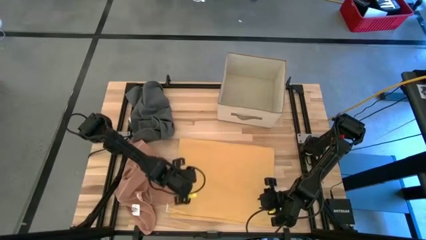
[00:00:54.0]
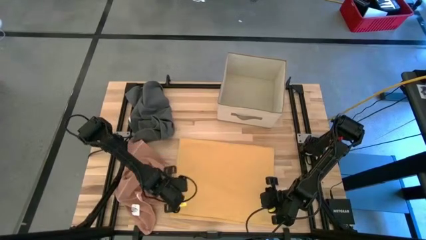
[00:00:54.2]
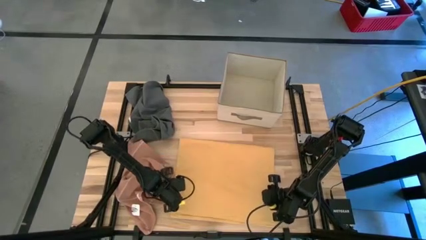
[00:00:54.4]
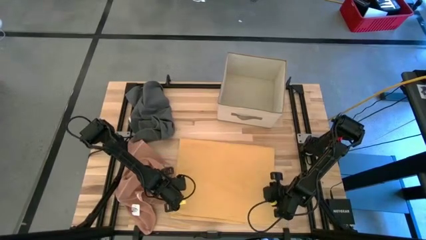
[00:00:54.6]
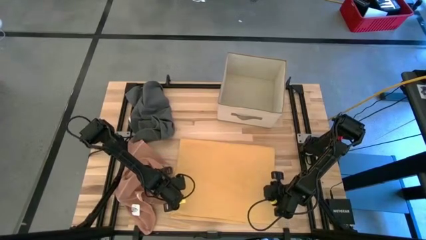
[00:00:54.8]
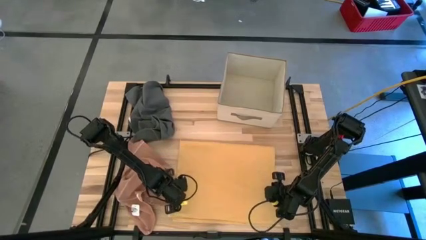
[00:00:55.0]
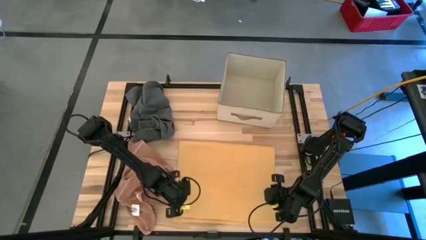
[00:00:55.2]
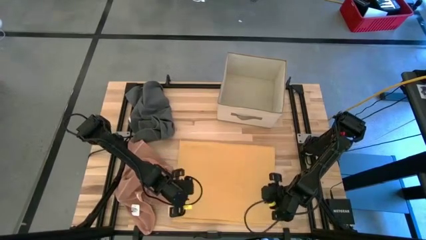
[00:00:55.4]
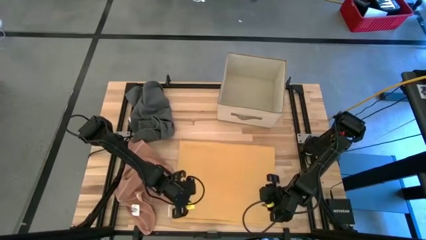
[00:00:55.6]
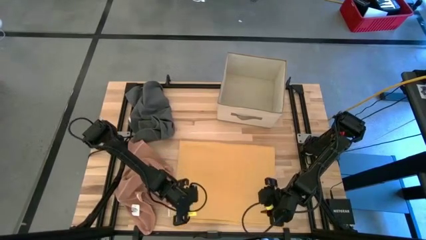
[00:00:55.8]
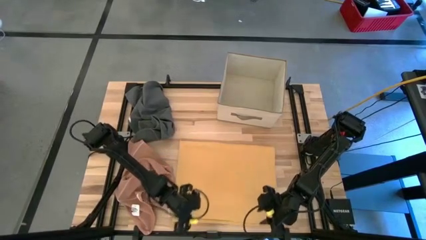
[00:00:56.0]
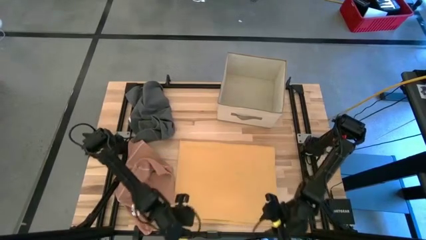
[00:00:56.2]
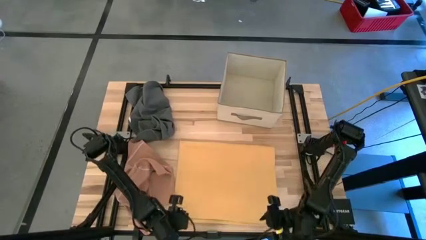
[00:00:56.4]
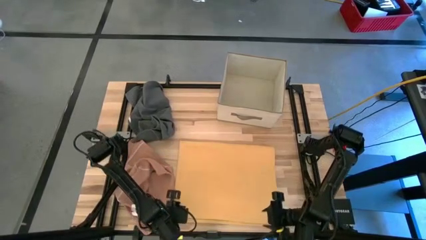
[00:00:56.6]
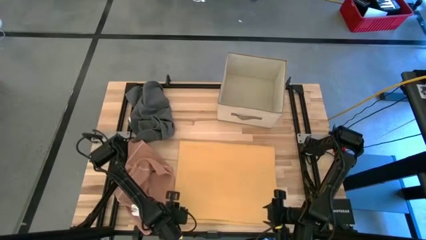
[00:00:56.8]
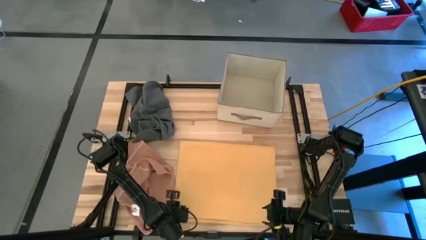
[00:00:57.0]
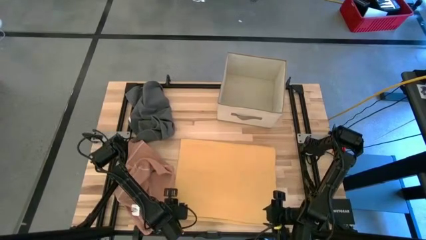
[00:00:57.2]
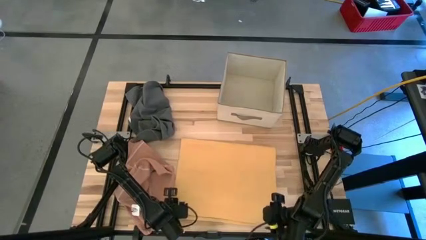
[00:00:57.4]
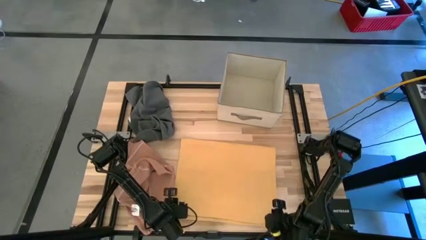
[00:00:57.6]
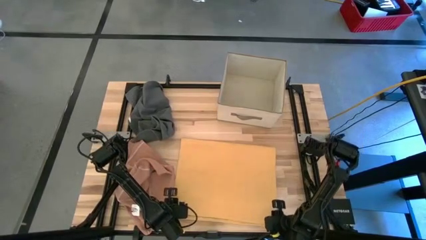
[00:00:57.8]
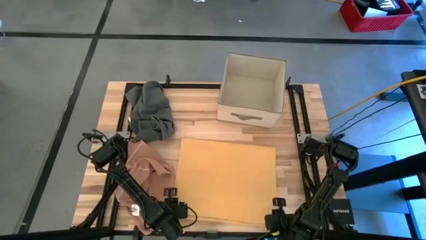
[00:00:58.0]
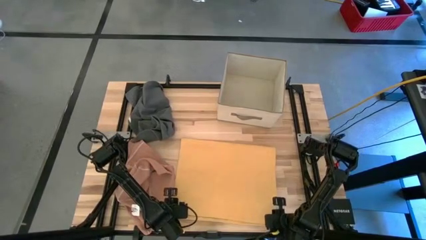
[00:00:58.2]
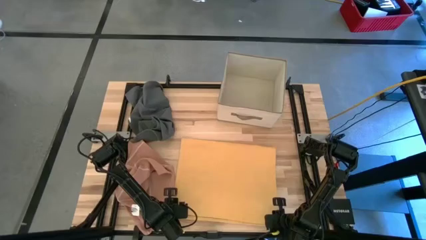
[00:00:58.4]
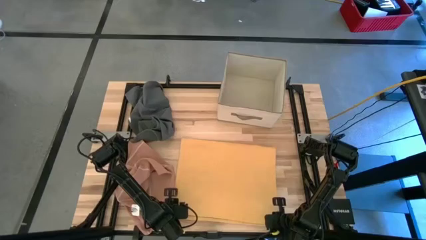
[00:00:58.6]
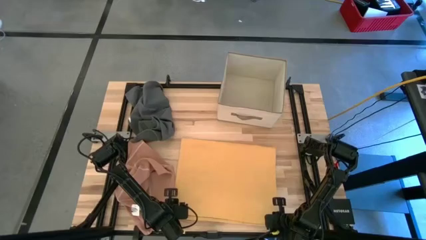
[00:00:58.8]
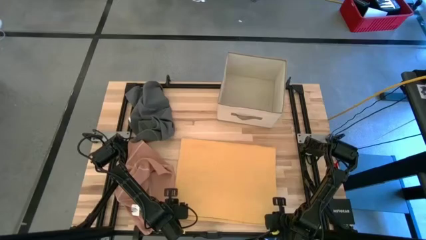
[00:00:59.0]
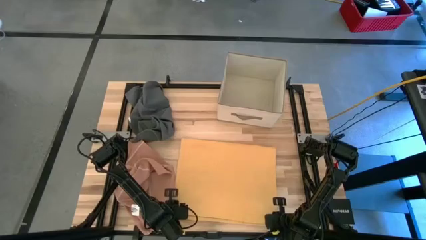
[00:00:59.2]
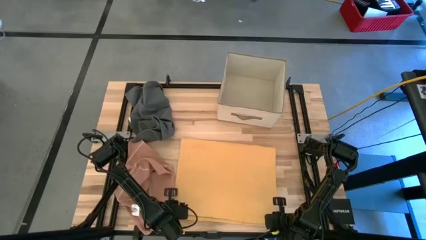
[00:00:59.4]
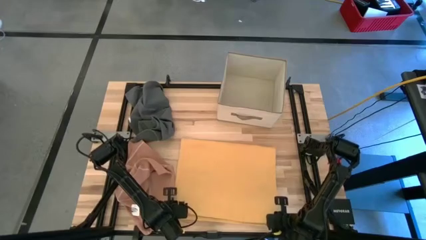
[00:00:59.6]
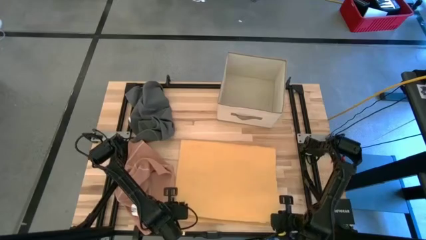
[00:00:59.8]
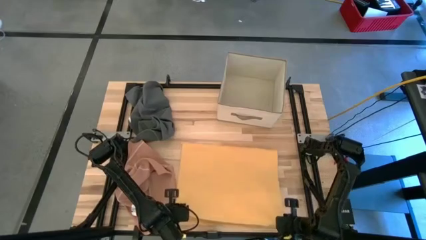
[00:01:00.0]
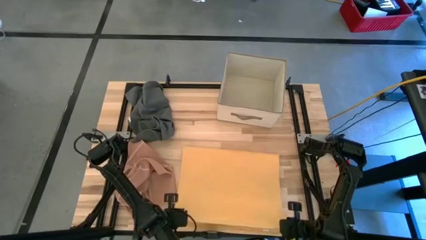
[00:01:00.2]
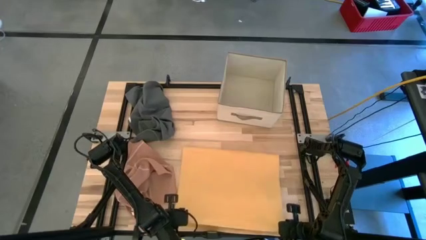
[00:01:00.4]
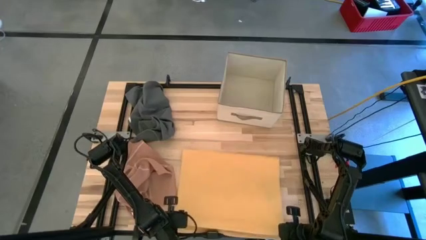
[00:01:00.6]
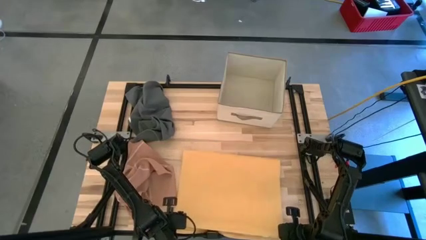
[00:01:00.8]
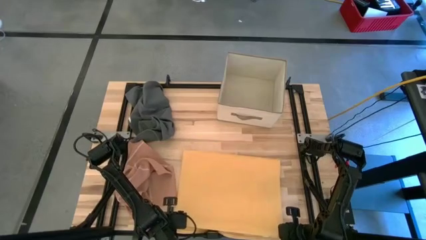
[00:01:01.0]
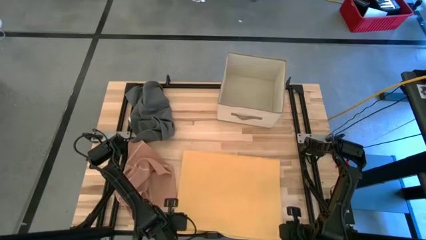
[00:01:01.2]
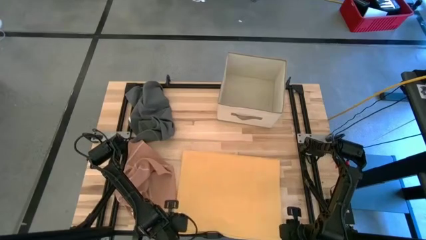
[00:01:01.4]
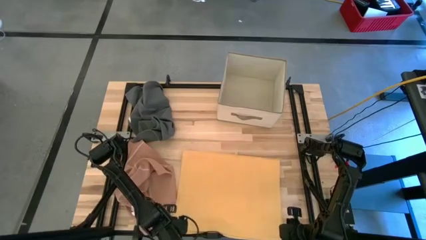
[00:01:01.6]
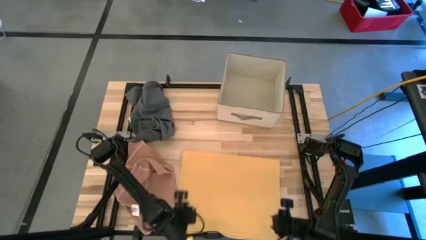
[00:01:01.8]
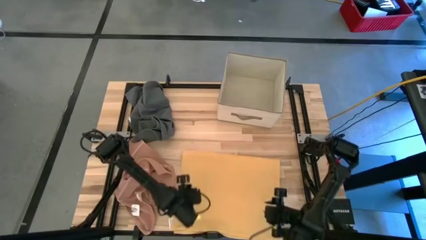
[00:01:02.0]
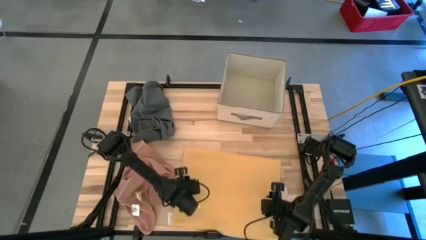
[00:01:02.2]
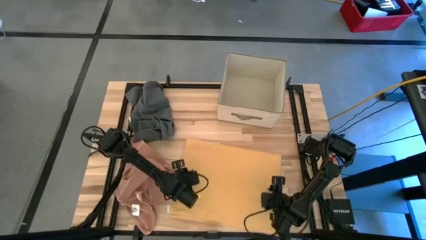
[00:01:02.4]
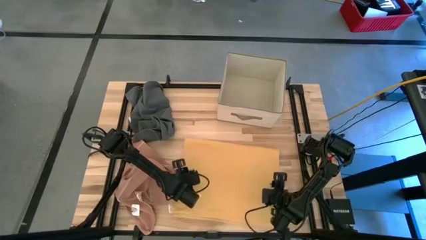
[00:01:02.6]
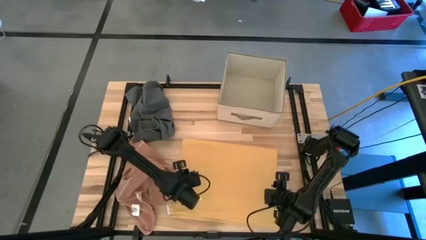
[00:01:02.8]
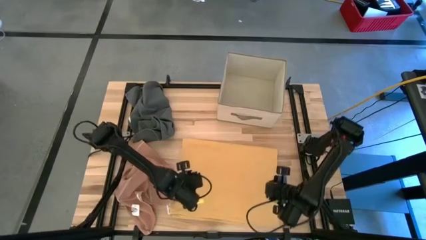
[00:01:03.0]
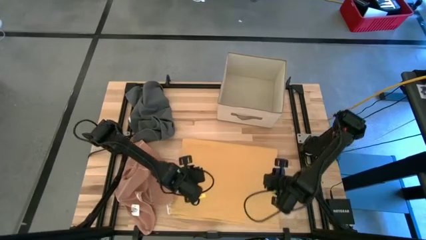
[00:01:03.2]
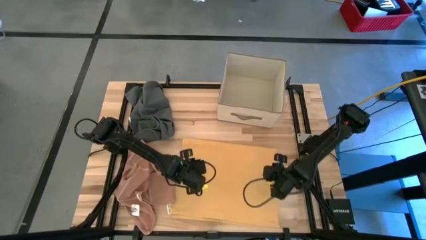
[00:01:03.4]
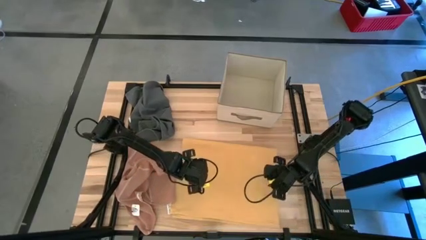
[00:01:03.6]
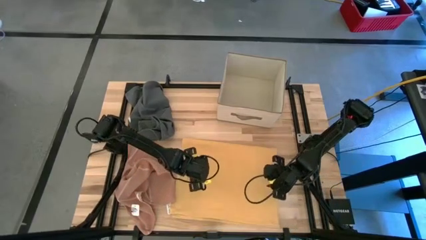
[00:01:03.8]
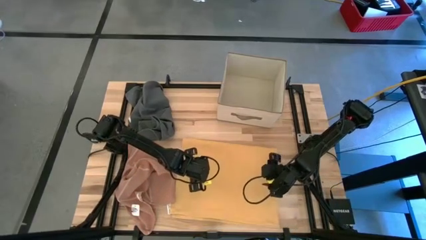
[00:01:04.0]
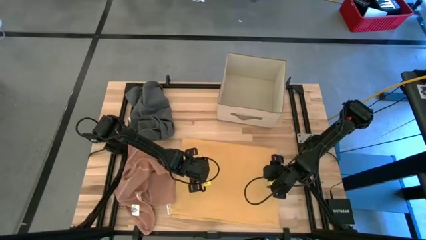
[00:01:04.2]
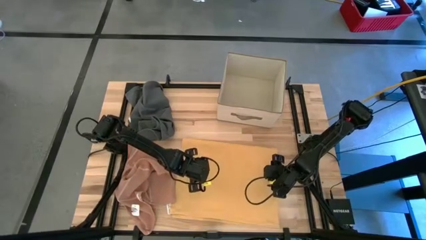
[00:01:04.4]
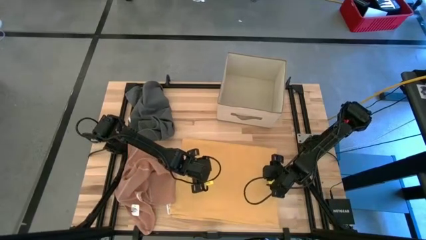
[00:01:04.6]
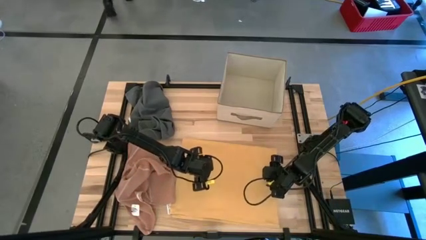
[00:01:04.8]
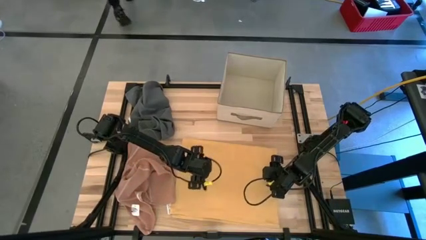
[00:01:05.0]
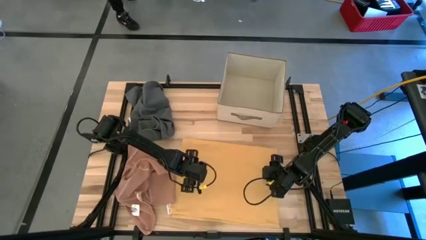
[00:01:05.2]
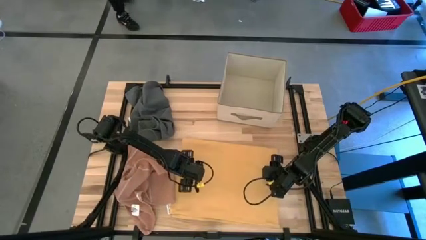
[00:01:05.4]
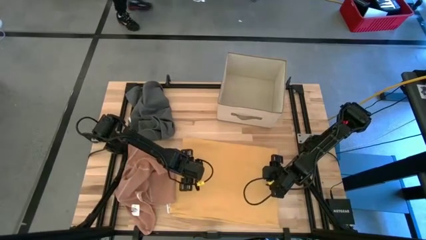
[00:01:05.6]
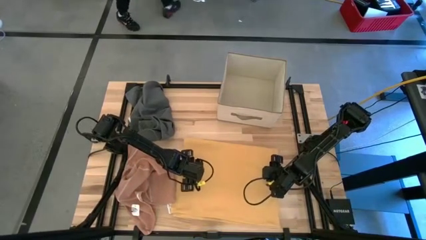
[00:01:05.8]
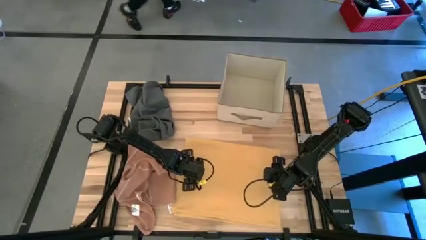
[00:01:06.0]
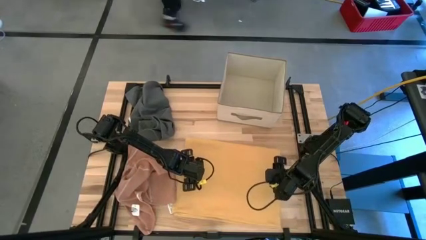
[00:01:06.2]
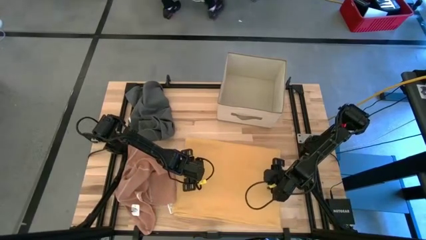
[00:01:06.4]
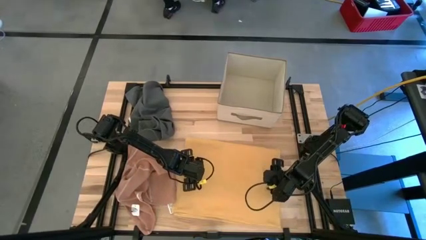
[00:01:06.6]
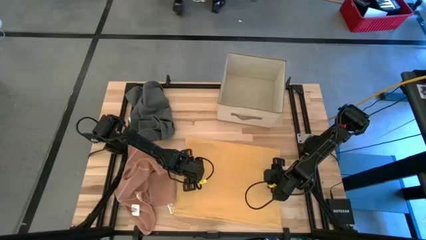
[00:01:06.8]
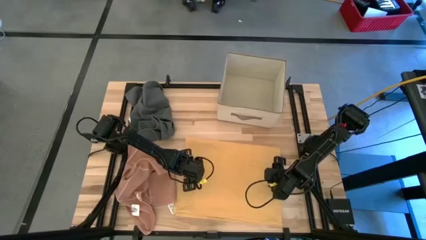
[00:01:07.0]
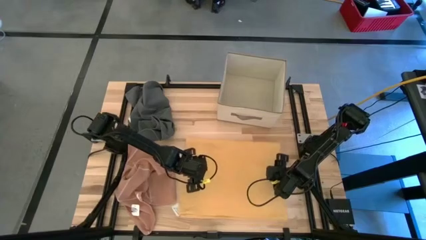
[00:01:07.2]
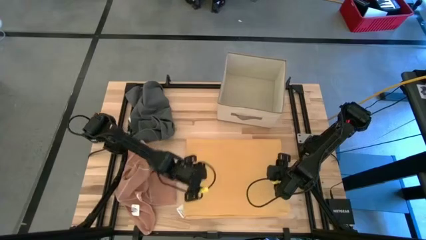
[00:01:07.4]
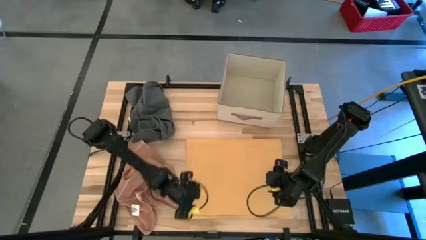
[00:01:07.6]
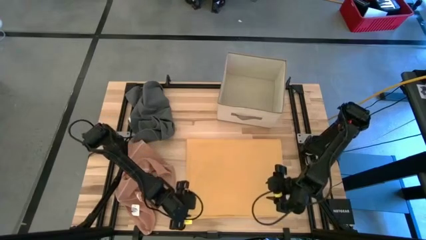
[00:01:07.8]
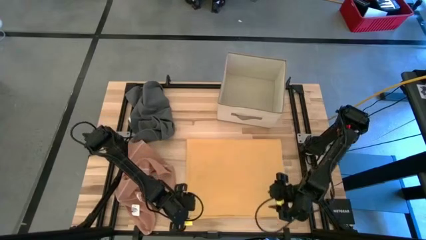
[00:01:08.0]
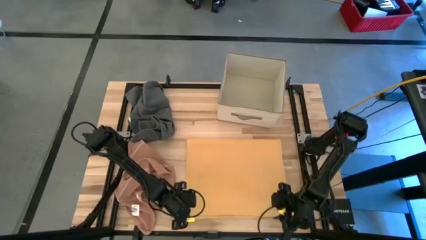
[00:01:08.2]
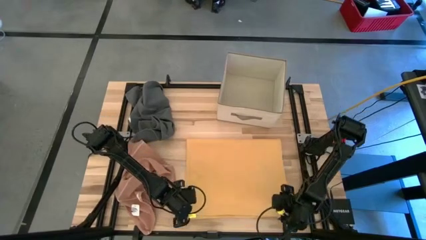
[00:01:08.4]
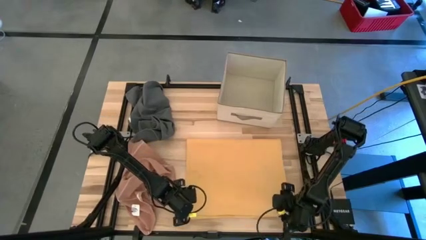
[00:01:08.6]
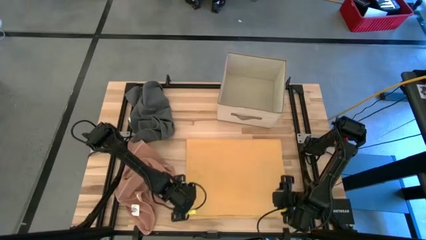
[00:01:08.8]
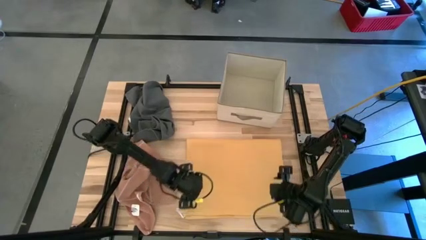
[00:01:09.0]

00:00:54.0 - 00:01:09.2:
Task: Fold towel
Fold the yellow towel

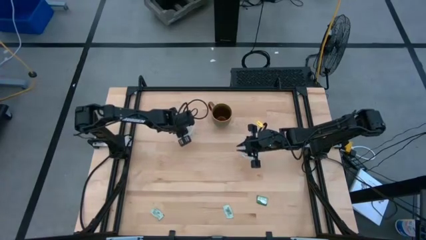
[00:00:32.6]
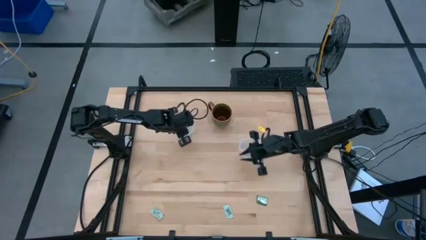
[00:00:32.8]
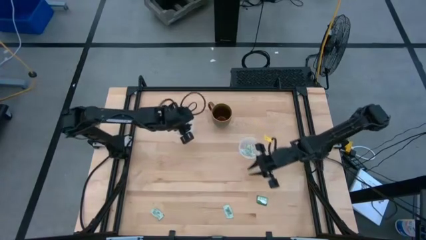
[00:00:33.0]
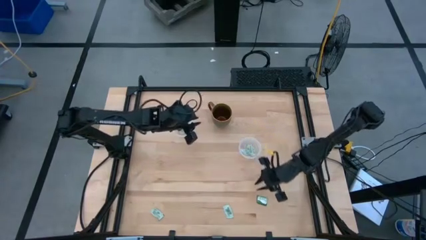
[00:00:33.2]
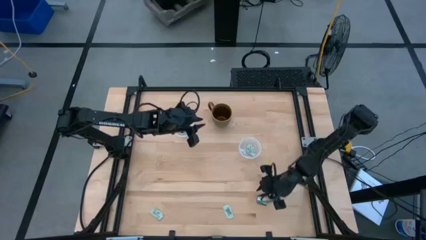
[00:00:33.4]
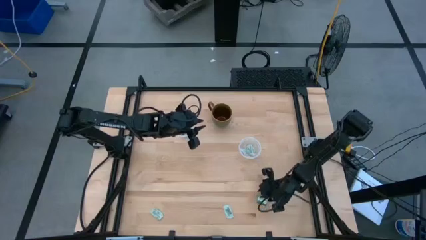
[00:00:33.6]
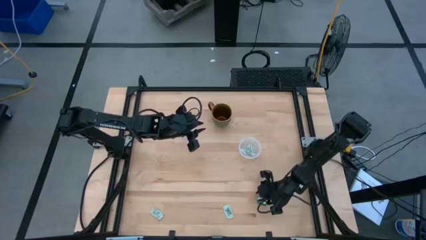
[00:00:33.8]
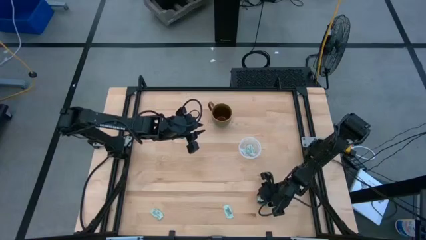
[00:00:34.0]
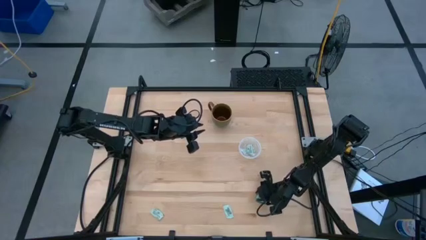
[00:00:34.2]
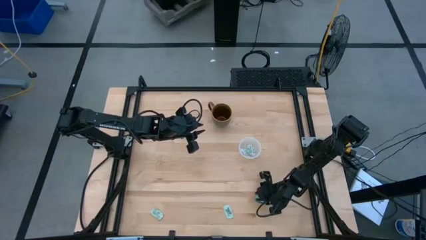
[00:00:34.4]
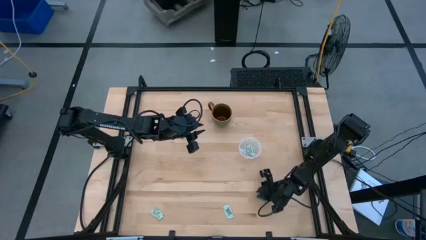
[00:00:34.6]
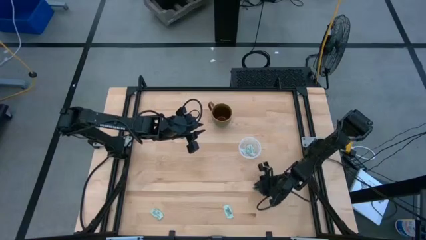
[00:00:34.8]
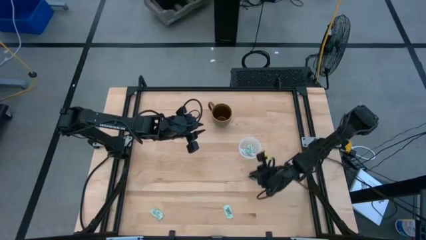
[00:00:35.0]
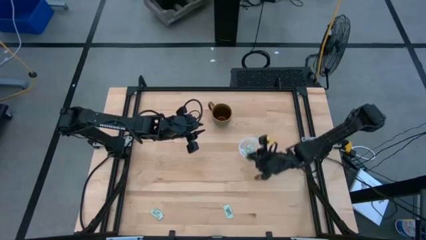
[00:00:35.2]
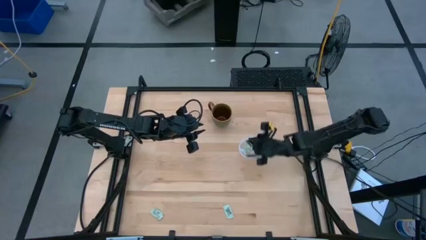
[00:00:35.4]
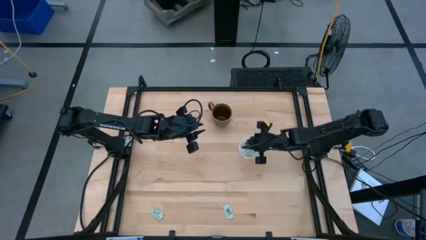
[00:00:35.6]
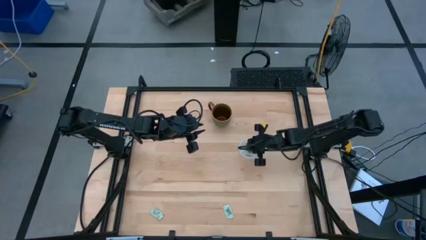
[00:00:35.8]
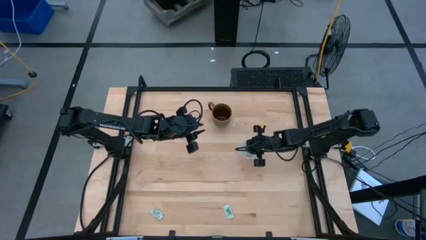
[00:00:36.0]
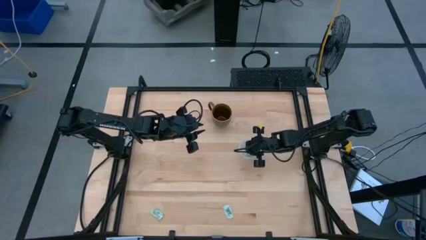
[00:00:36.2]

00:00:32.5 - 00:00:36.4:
Task: Pick and place Stevia / Truvia into bins
Put the green truvia packet into the right round transparent container
